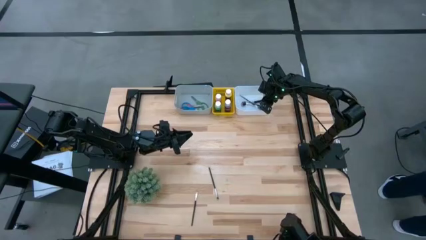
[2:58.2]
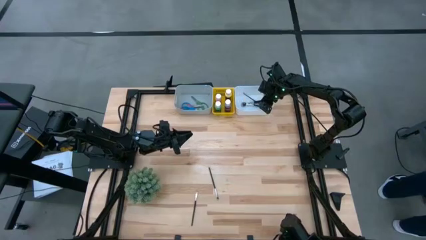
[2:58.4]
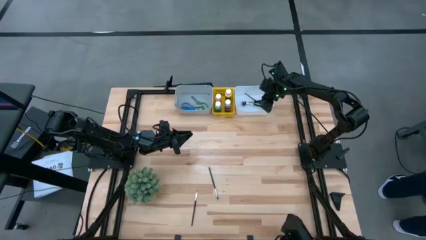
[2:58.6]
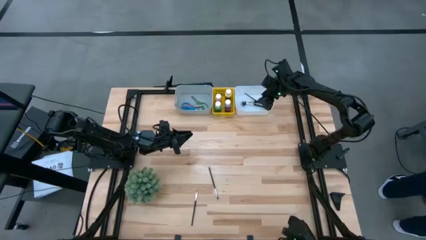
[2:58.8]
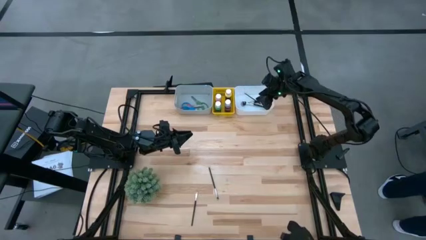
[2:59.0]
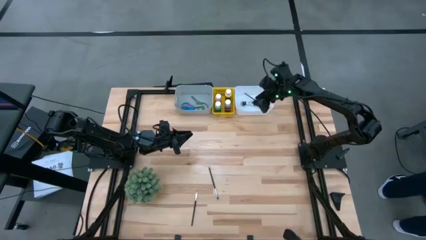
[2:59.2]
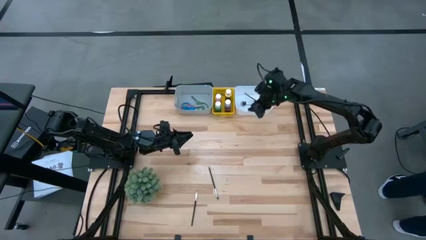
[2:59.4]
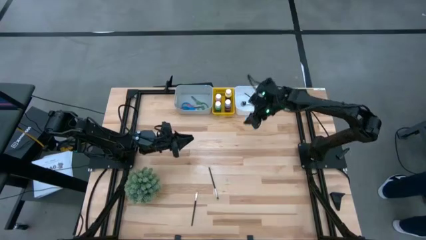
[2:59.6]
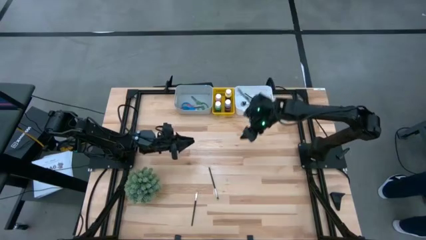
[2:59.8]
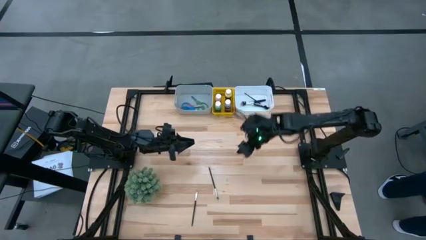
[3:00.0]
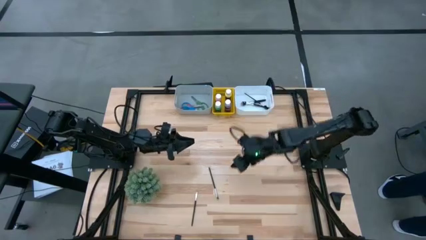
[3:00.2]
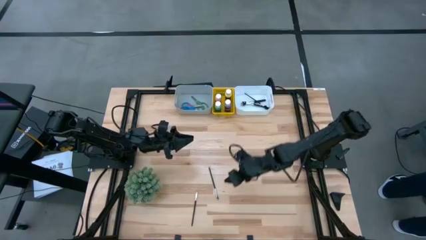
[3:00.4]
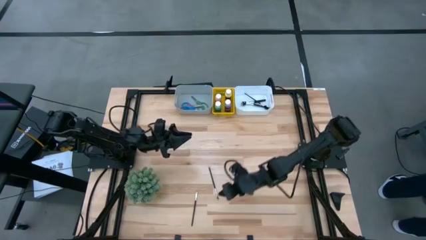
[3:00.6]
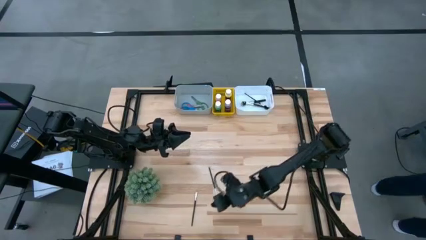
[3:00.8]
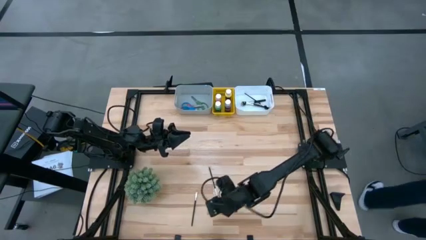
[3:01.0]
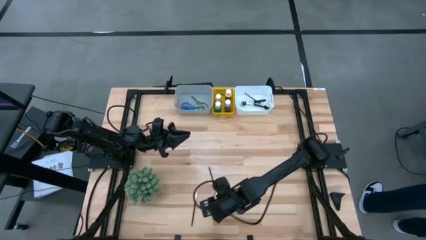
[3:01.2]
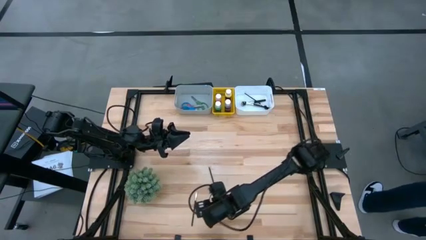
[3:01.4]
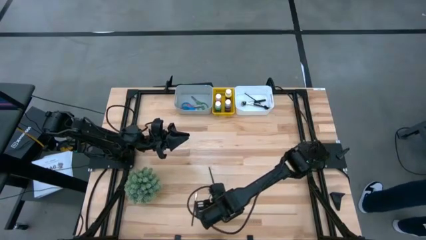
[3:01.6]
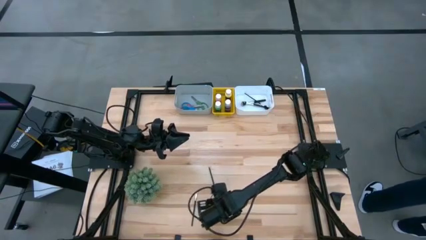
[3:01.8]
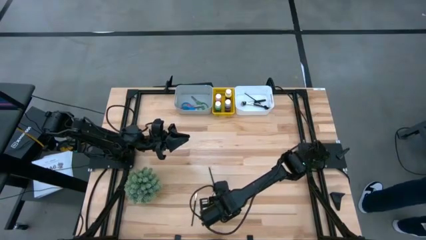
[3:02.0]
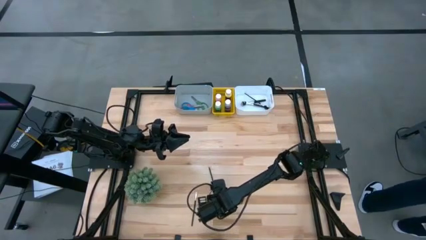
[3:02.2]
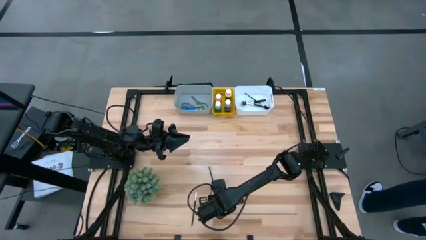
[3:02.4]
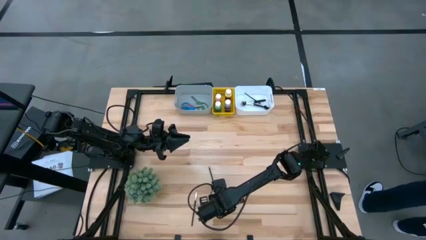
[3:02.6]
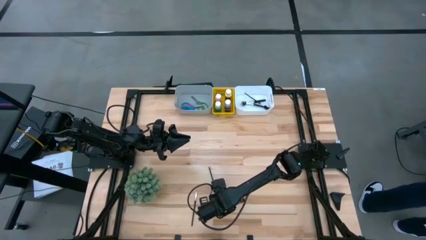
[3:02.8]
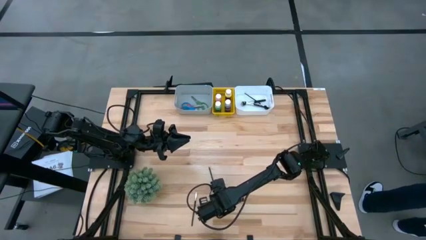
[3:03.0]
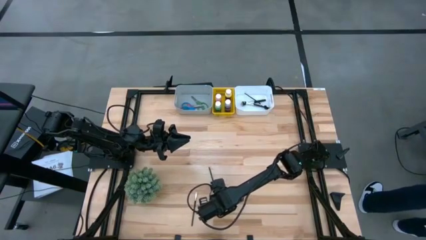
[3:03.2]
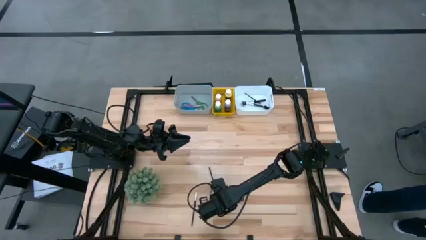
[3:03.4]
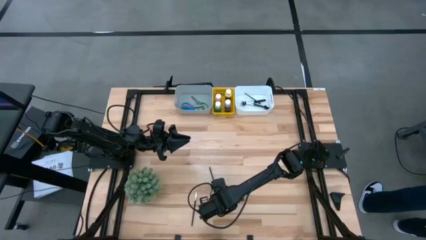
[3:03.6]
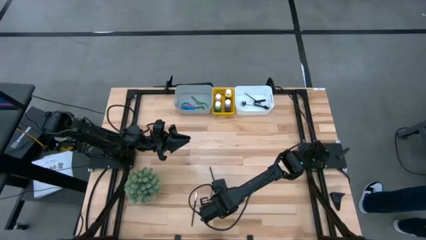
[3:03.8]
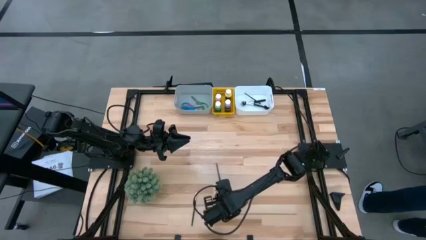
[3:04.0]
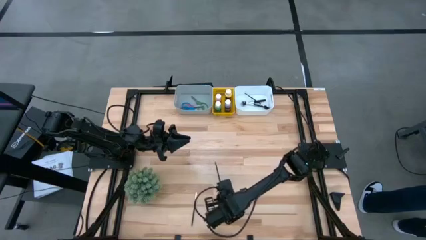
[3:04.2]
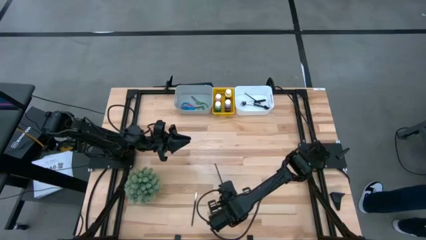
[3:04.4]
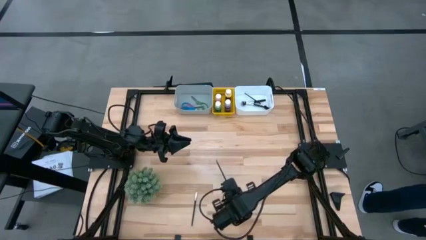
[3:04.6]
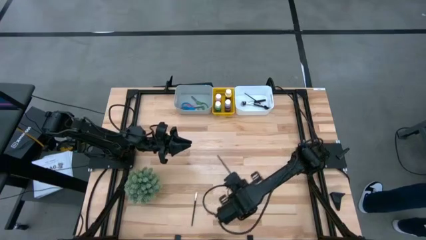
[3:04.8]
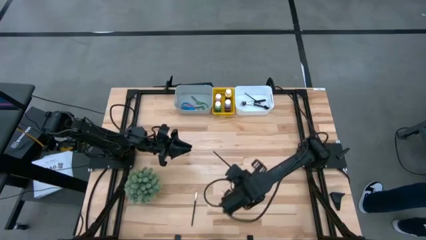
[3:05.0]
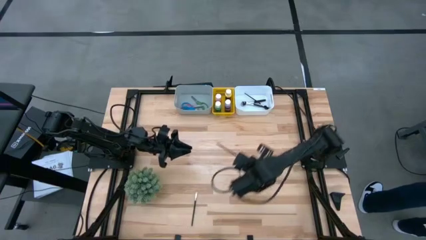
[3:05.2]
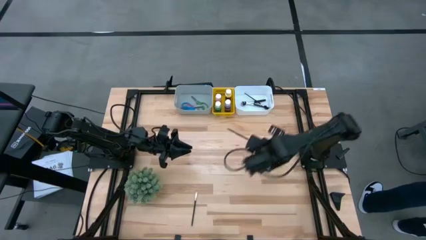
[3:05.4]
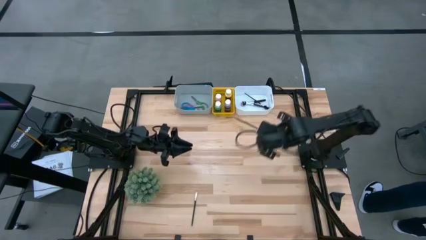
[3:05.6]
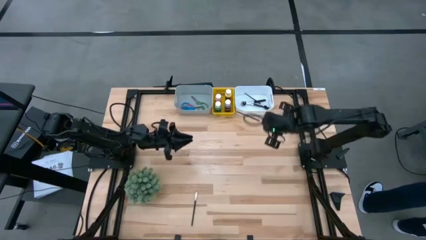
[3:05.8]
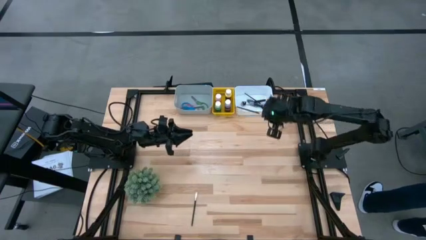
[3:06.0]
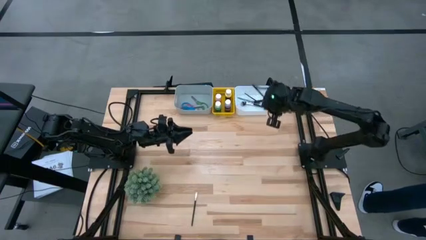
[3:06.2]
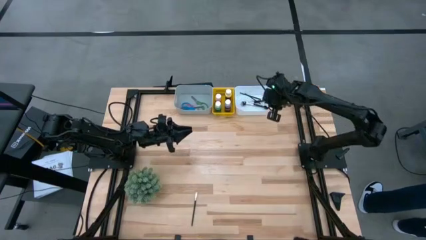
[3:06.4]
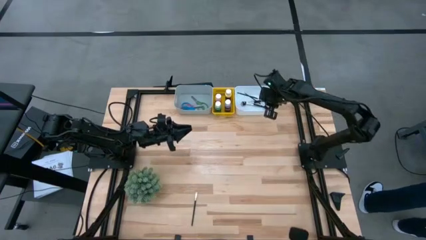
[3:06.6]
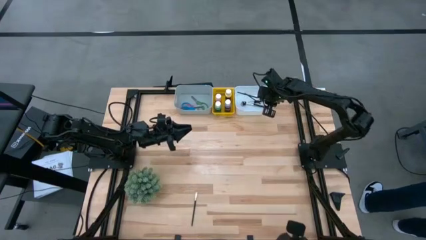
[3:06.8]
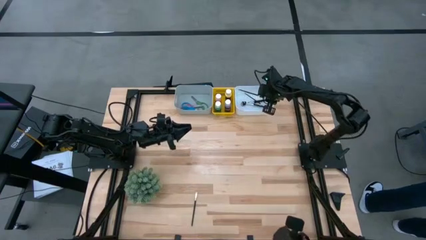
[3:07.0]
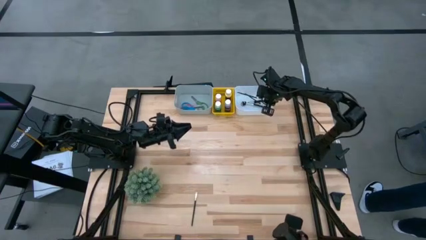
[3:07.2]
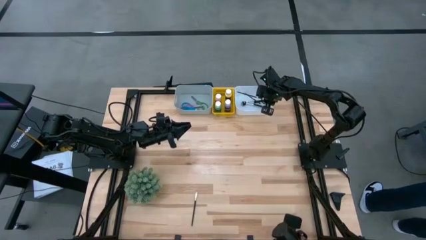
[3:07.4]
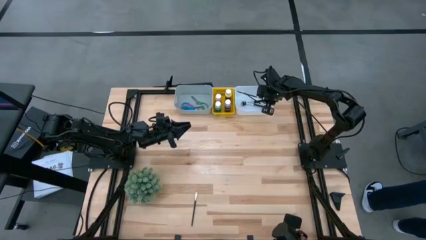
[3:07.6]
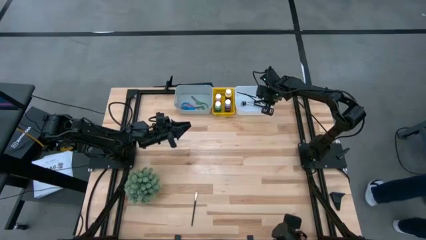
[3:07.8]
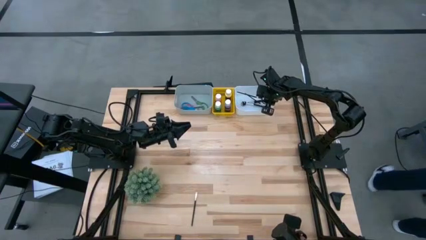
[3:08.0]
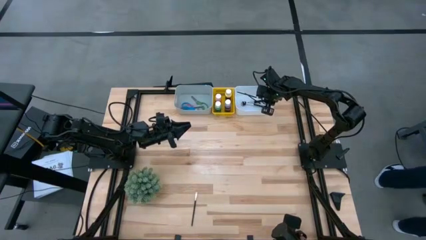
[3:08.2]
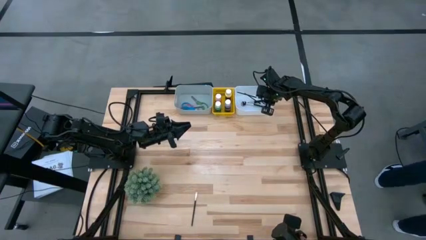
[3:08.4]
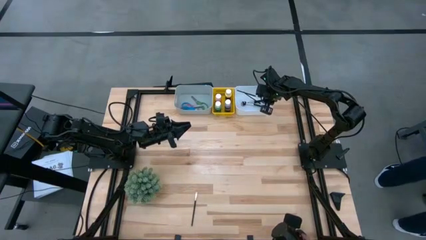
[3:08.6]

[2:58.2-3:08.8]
Task: Pick & Place Paint Supplies
Put the black foundation brush into the white bin

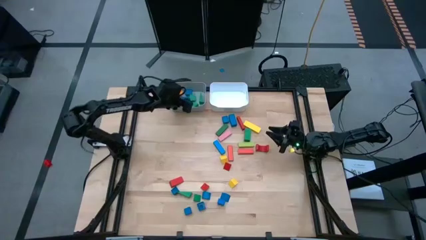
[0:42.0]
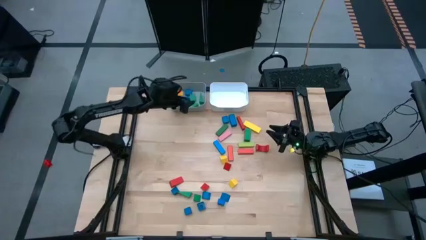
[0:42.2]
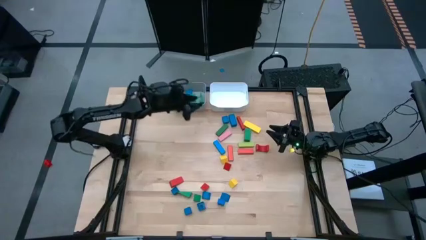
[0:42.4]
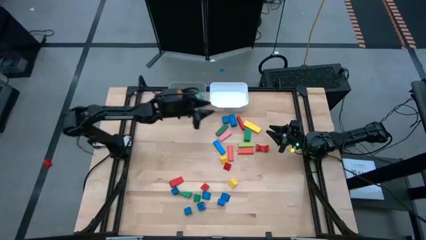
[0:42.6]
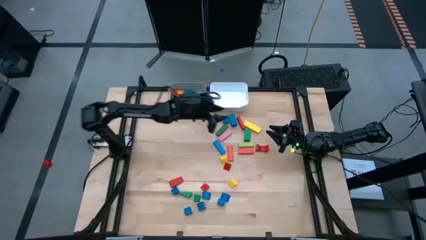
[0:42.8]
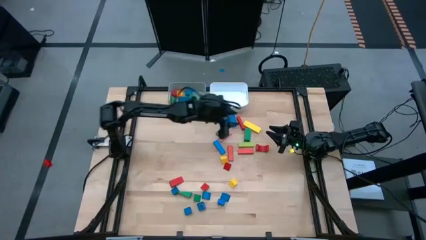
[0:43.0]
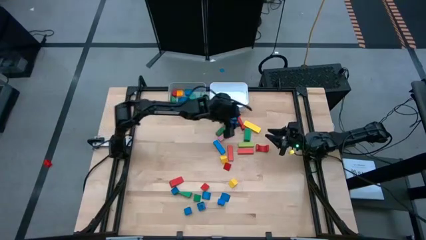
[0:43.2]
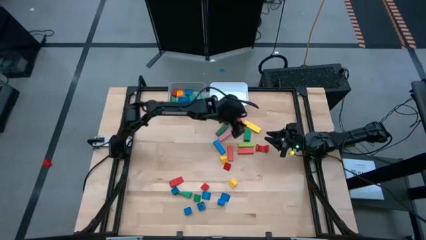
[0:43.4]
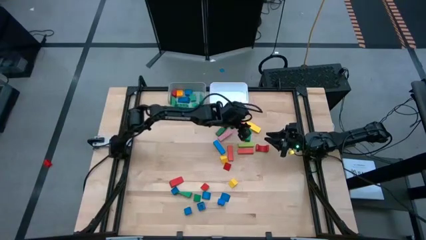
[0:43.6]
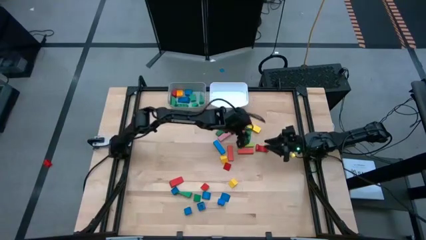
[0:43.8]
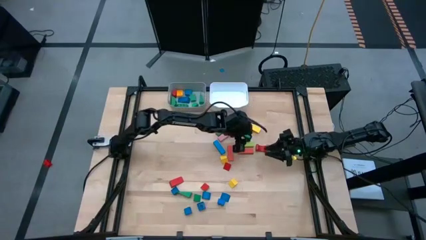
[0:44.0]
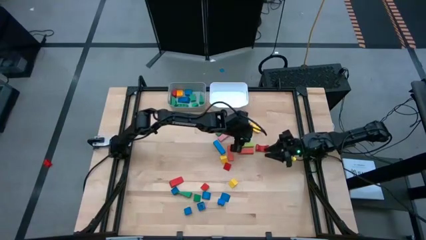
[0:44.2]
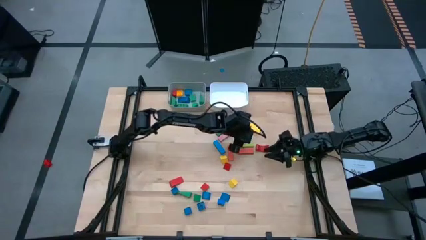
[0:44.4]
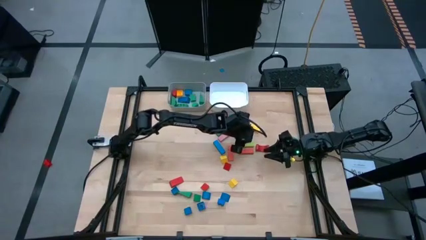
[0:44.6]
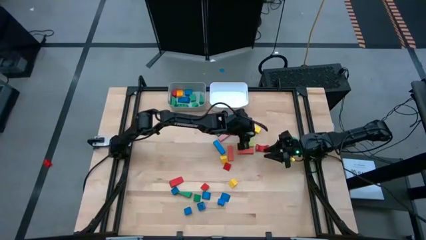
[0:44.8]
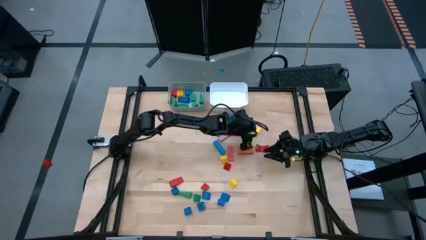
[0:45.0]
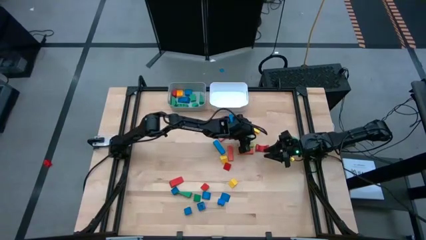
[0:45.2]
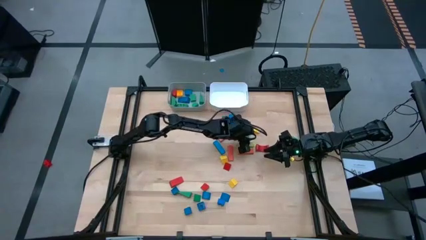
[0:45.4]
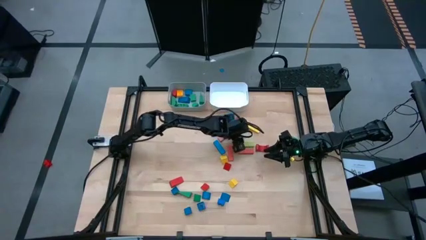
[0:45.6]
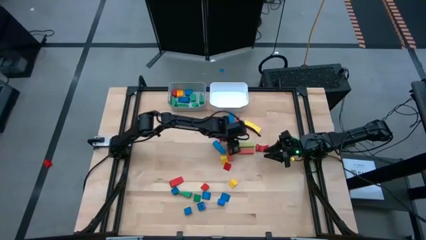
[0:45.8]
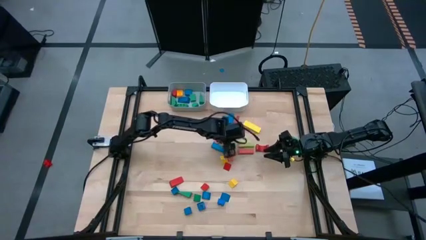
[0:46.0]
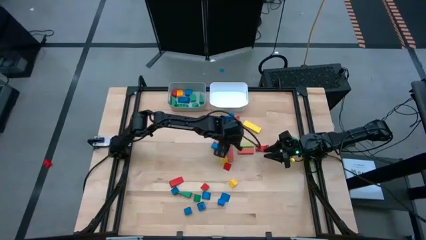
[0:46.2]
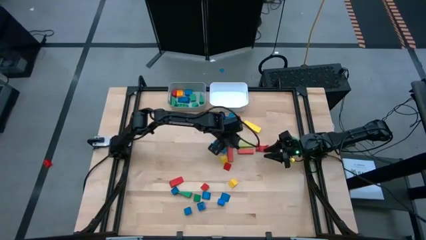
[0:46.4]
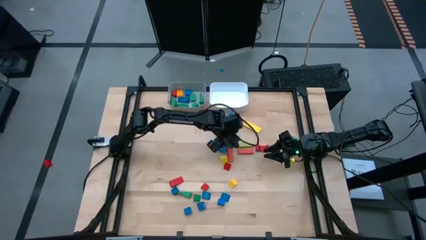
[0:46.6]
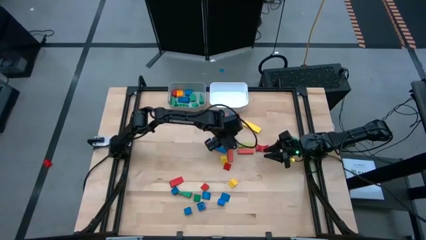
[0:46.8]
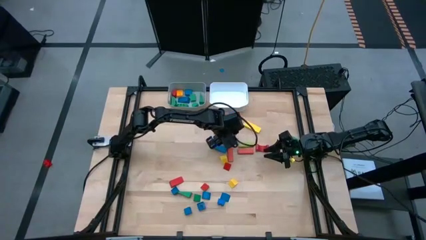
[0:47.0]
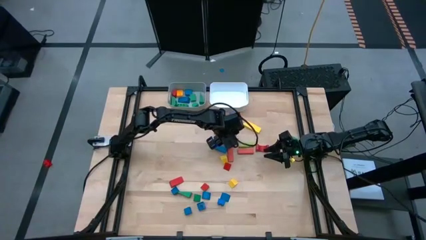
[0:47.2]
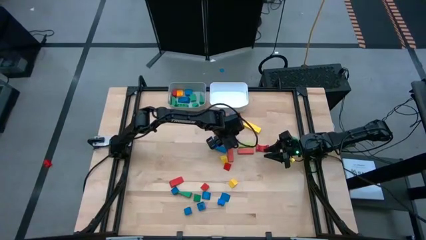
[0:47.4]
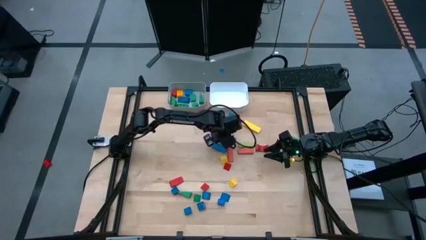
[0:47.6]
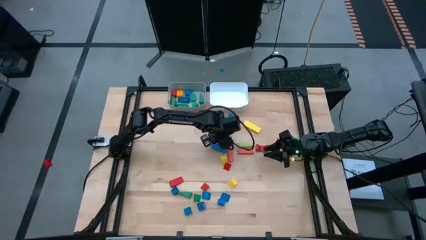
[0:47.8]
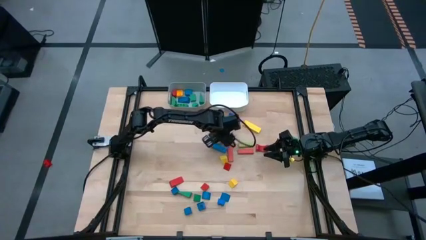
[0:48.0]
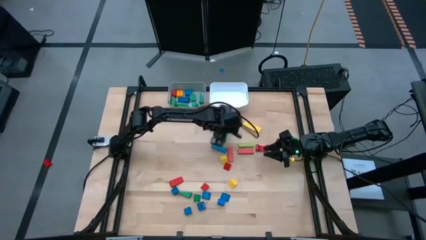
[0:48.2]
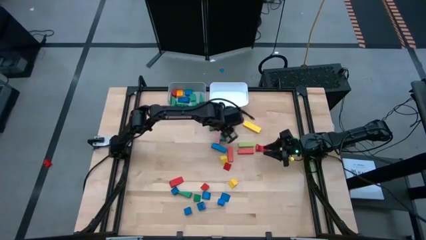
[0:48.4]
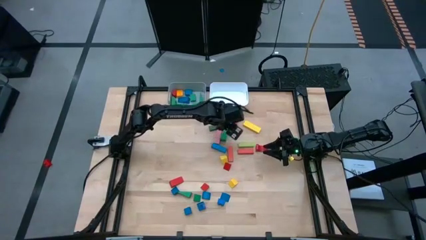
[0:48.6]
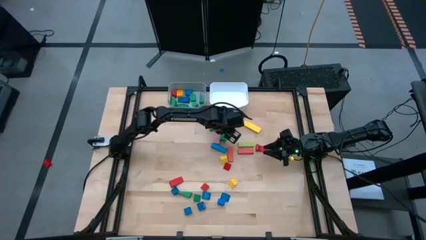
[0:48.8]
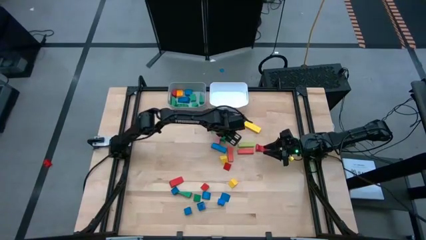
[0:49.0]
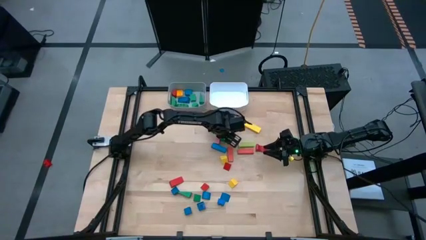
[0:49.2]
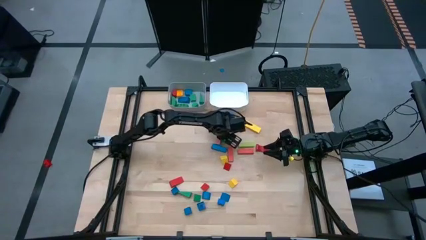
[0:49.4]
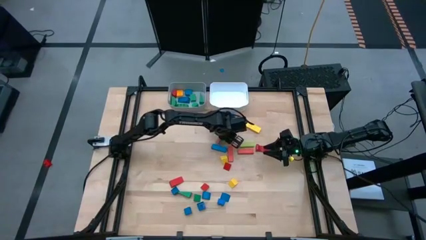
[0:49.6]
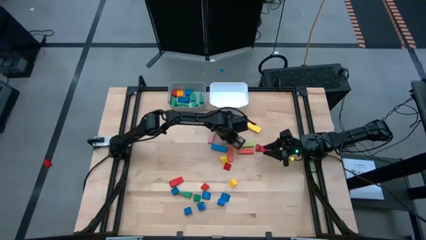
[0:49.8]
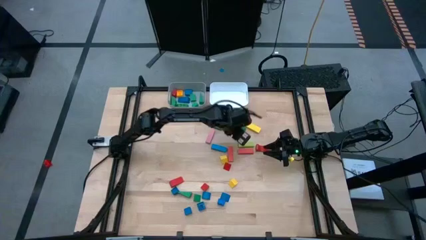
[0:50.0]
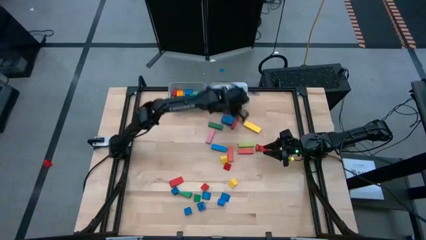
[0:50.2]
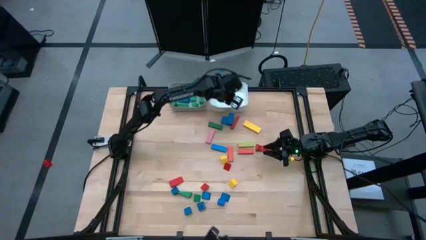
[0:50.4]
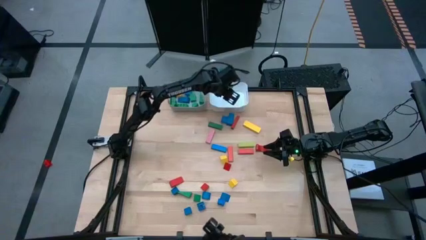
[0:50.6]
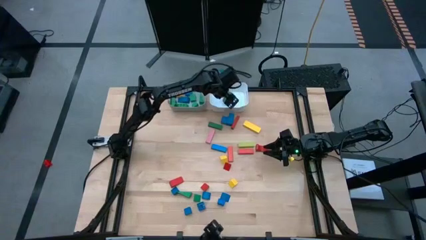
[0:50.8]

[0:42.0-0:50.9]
Task: Sort blocks by size
Put the green rectangular block into the white bin
